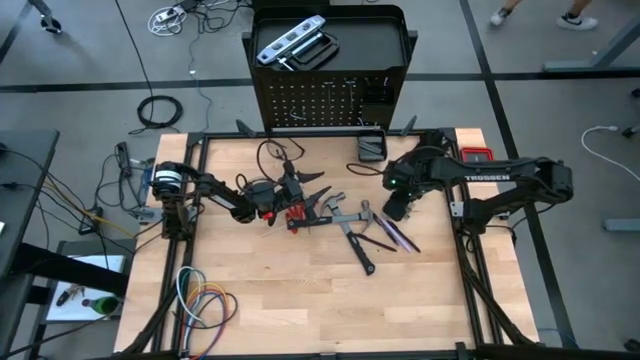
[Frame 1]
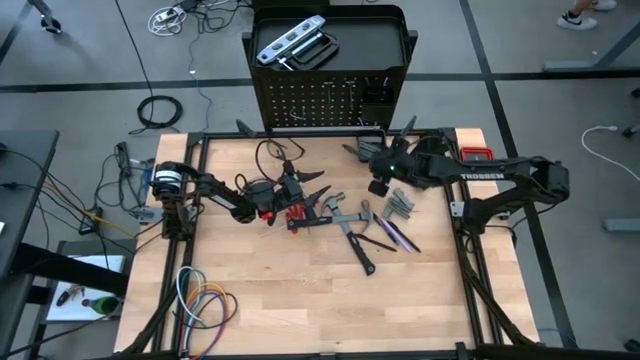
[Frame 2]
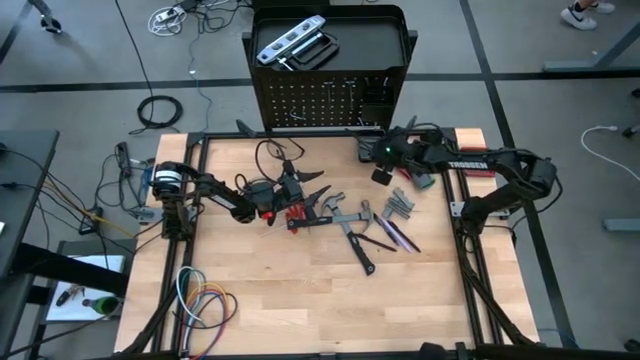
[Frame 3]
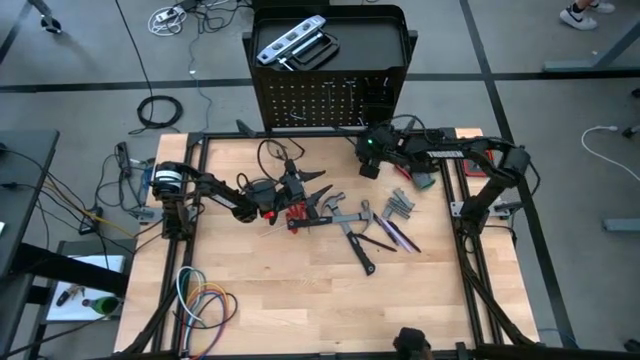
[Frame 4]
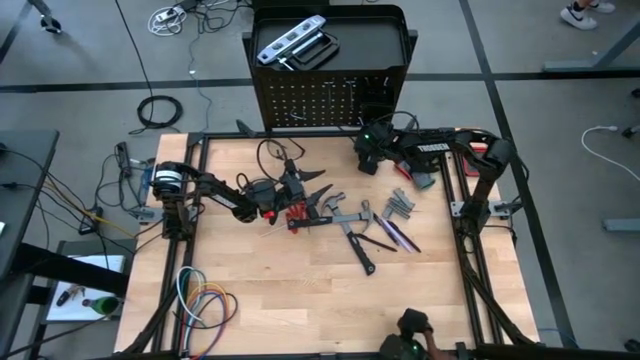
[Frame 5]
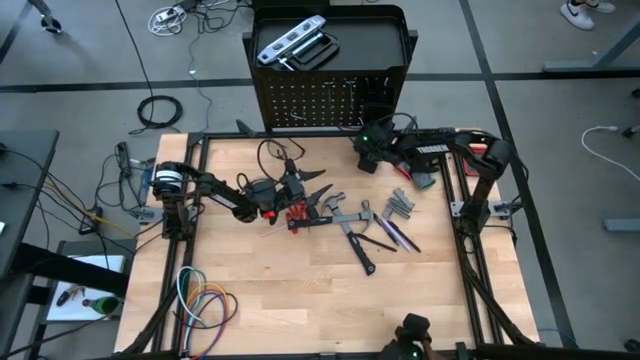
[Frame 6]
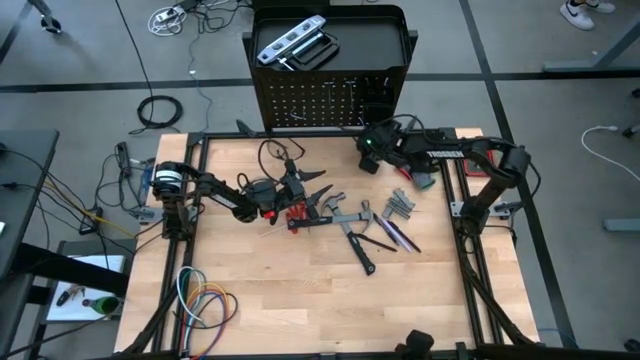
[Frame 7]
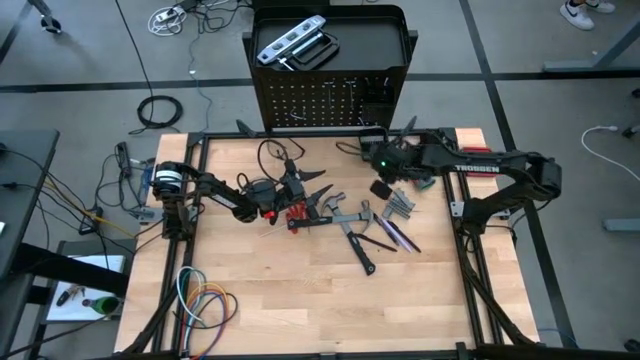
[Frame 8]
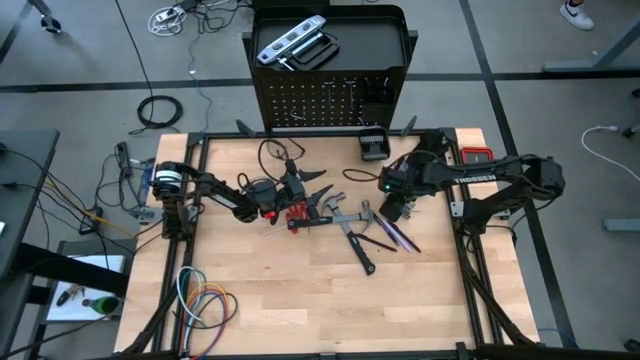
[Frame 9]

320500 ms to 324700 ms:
Task: Hang tools onto peg board
Remove the middle terminal block from the bottom basket of the peg board

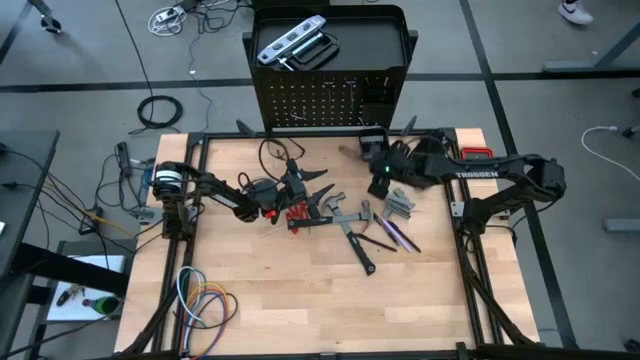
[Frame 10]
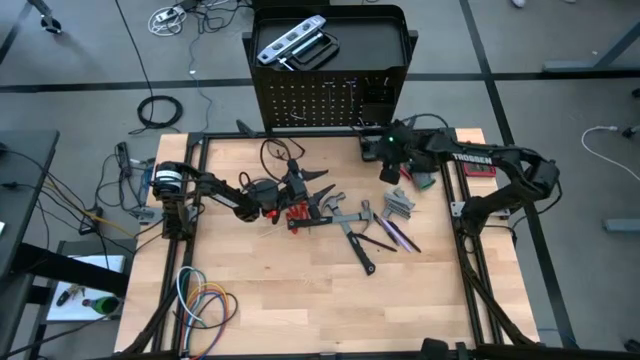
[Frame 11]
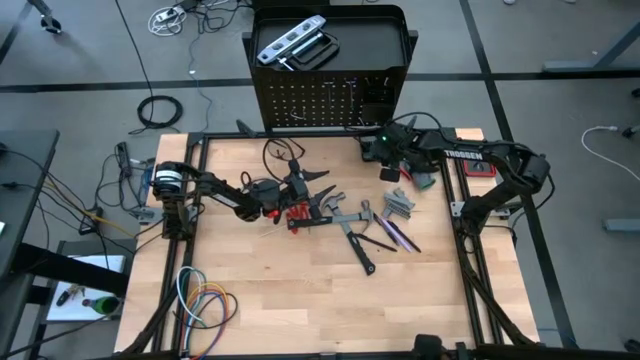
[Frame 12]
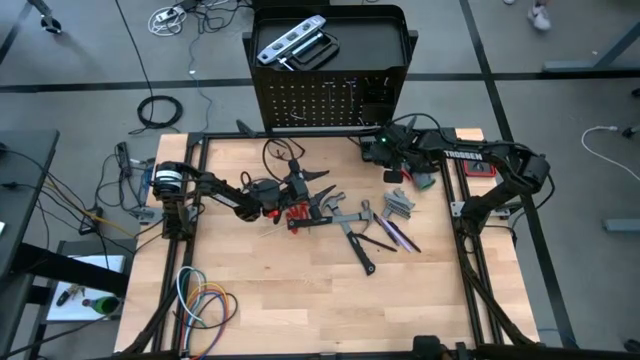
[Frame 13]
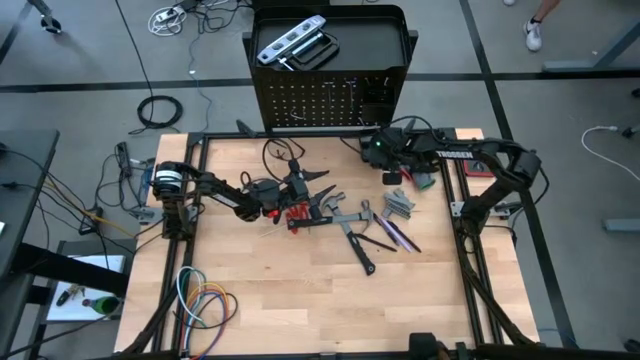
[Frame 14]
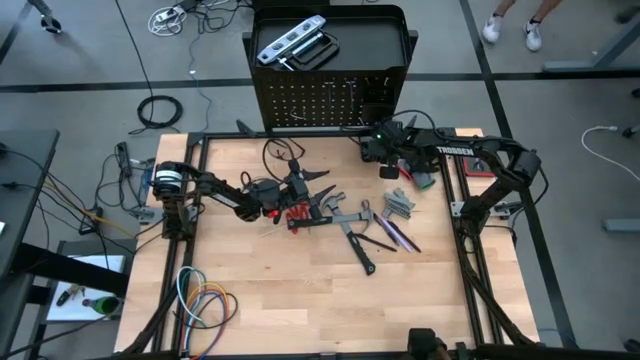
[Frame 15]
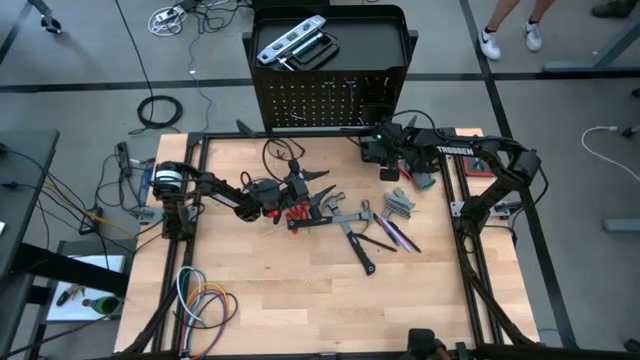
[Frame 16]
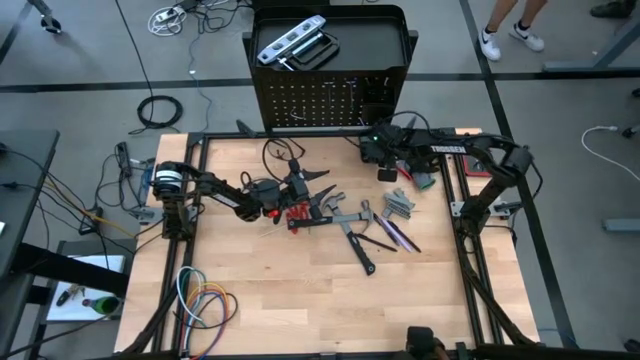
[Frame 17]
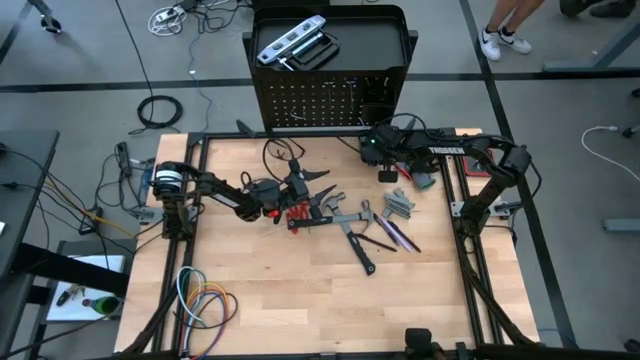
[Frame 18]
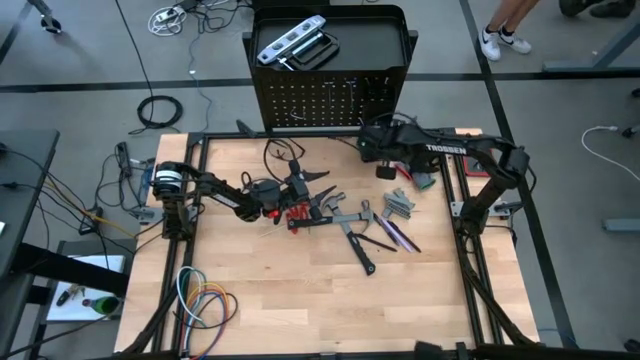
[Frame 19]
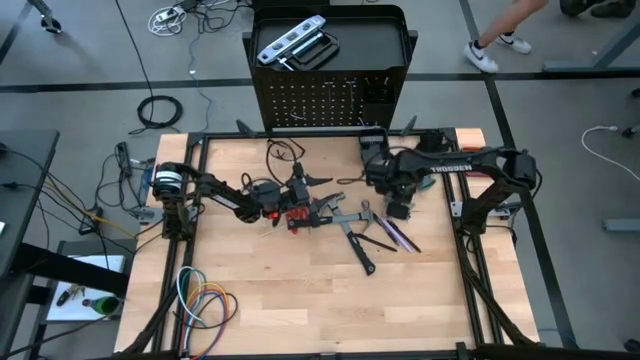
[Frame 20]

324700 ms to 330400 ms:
Remove the left terminal block from the bottom basket of the peg board

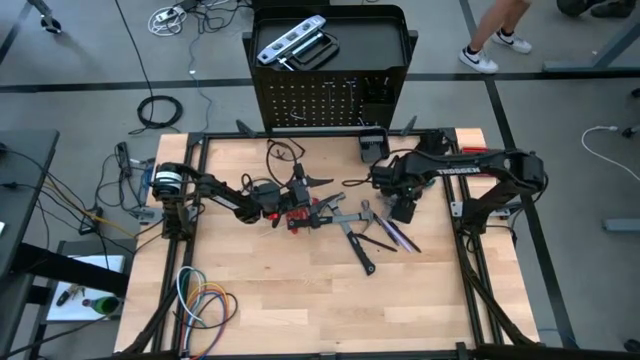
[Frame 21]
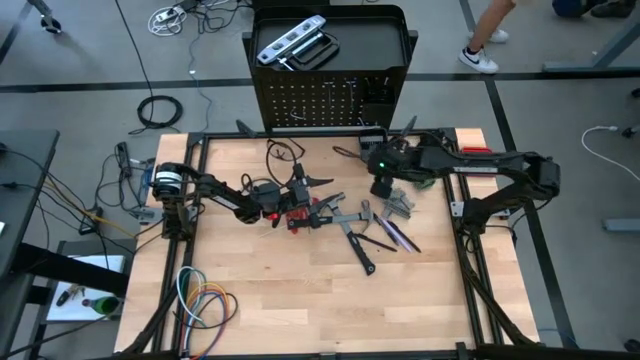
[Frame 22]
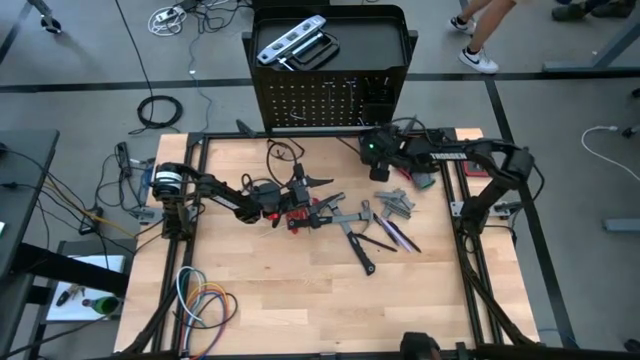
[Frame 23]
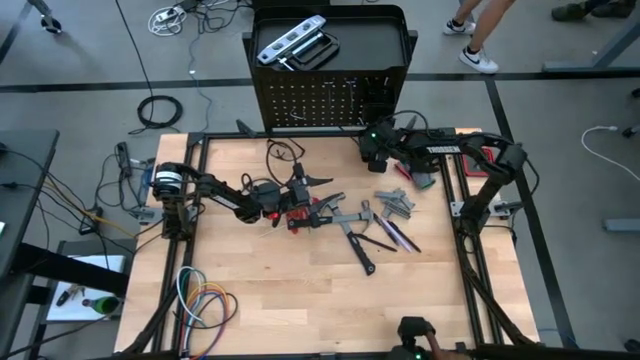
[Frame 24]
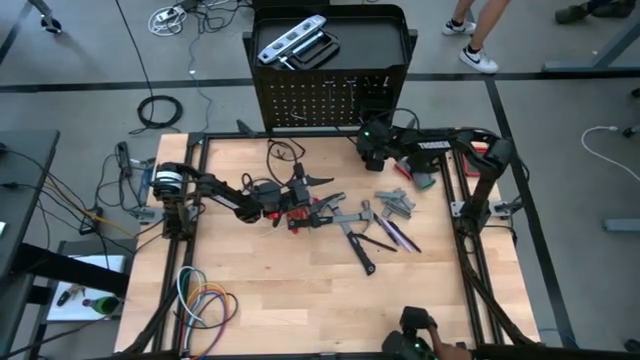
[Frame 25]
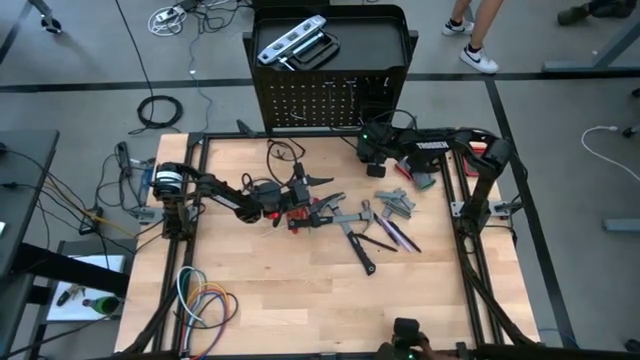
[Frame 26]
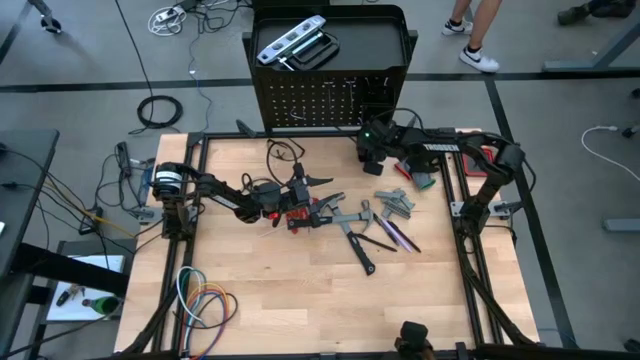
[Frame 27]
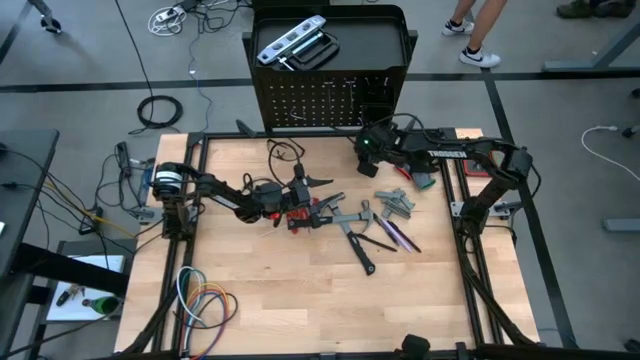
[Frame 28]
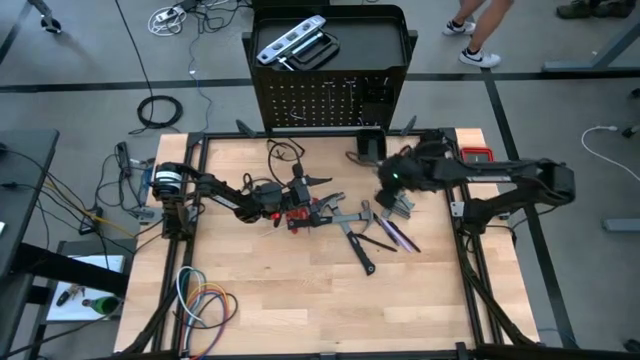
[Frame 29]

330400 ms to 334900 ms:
Remove the terminal block from the bottom basket of the peg board

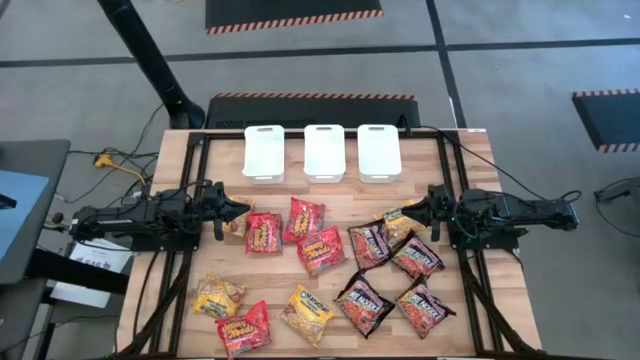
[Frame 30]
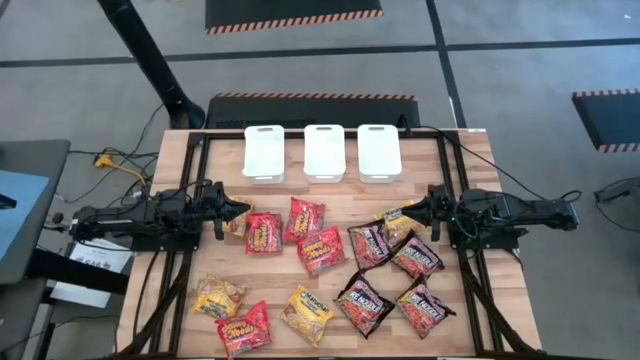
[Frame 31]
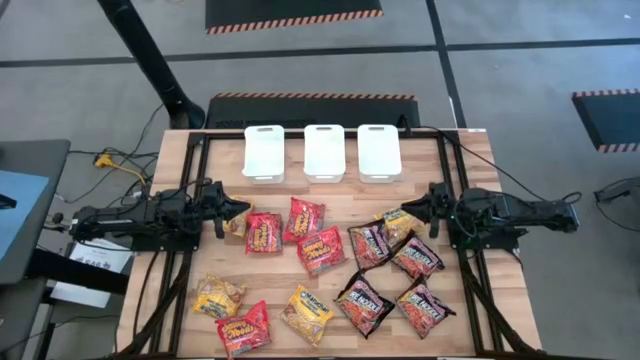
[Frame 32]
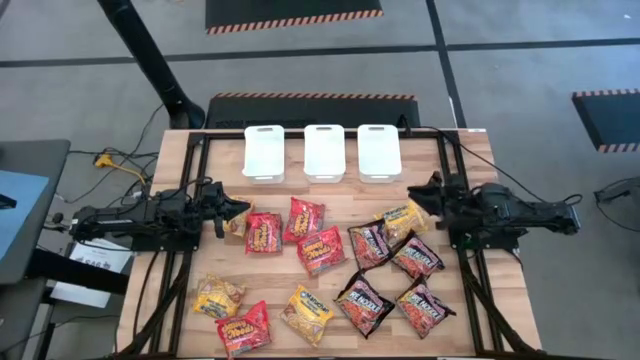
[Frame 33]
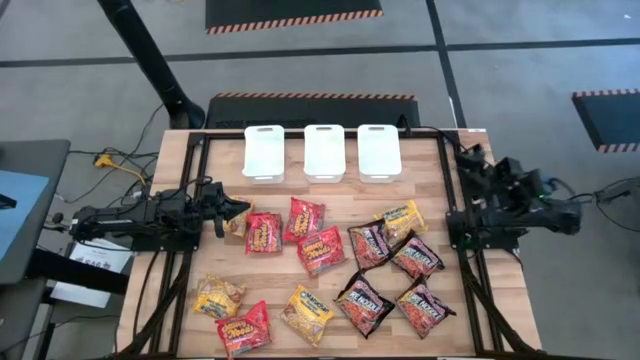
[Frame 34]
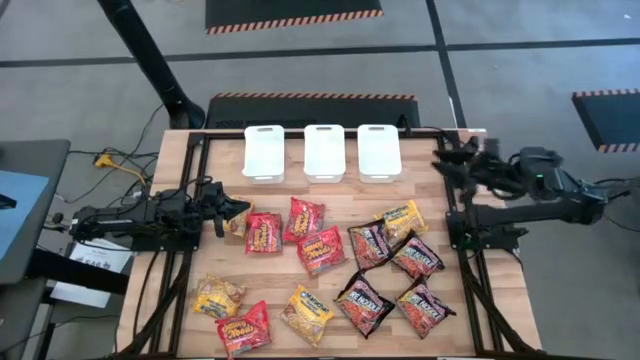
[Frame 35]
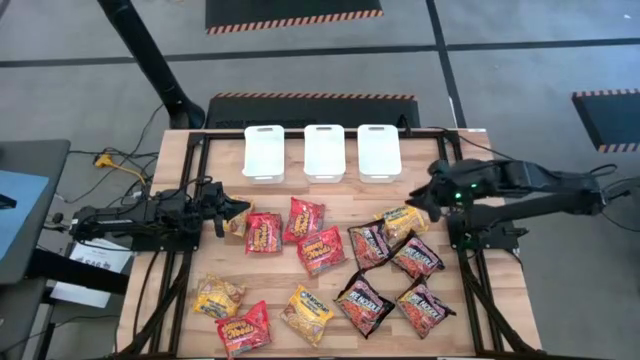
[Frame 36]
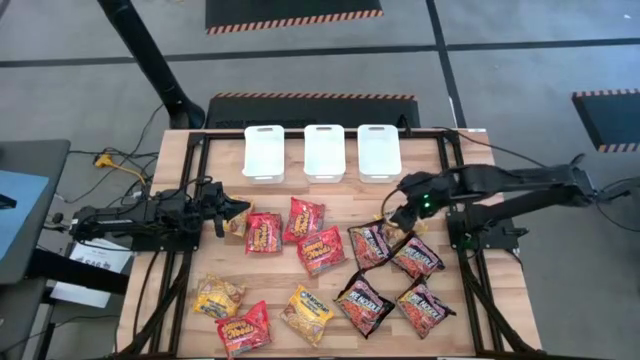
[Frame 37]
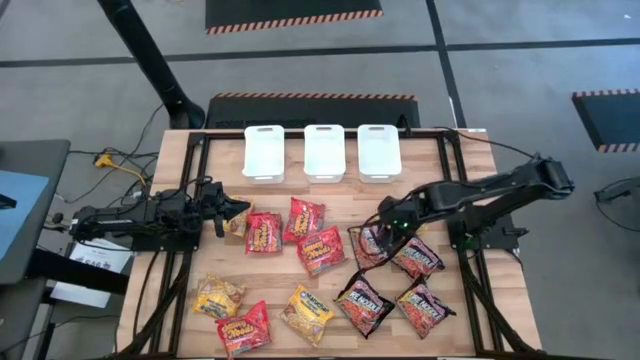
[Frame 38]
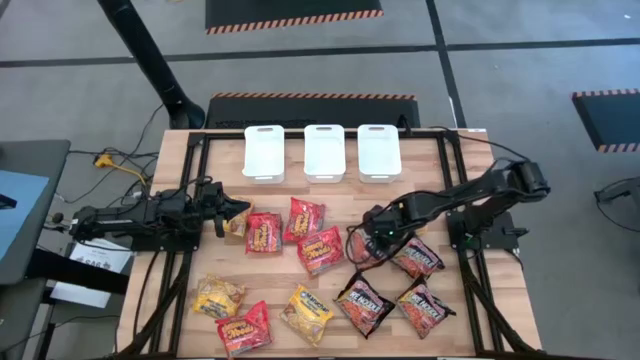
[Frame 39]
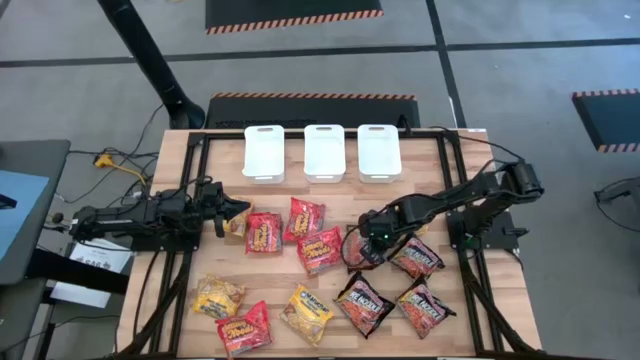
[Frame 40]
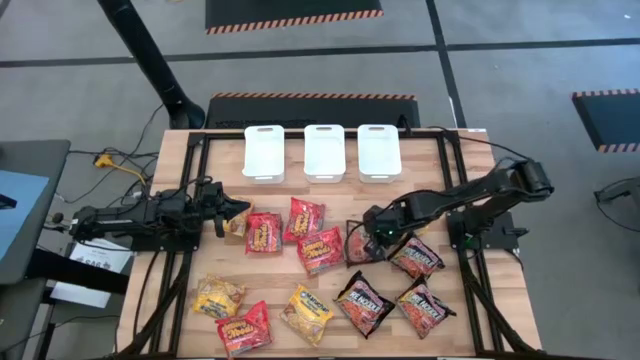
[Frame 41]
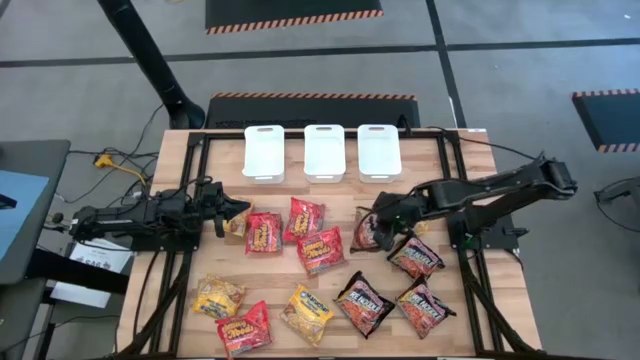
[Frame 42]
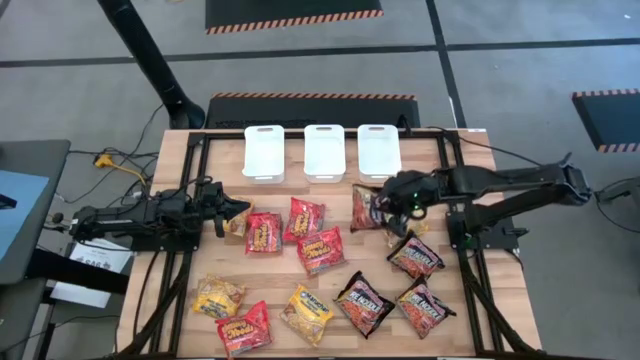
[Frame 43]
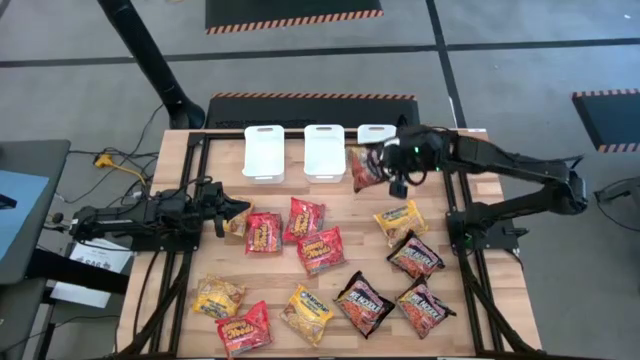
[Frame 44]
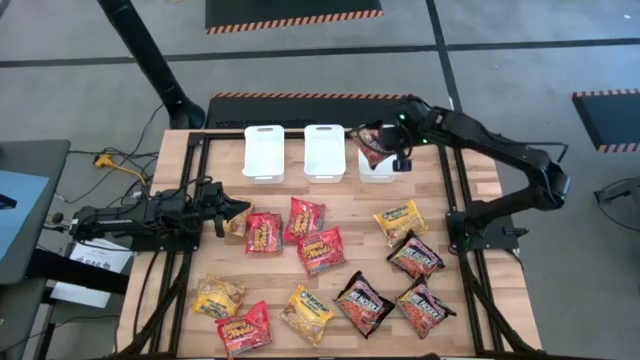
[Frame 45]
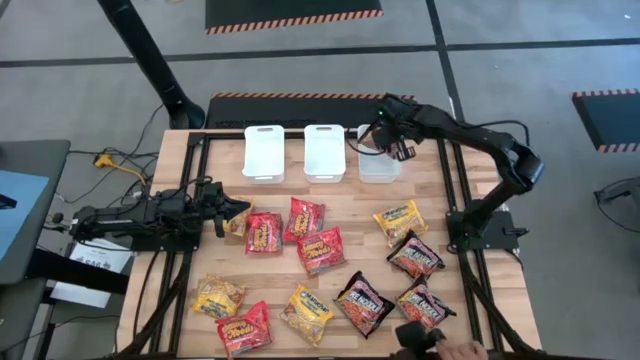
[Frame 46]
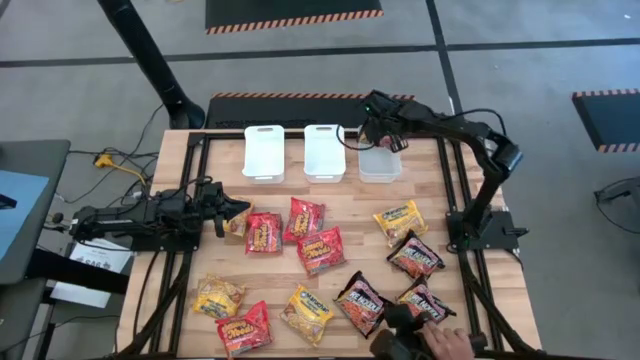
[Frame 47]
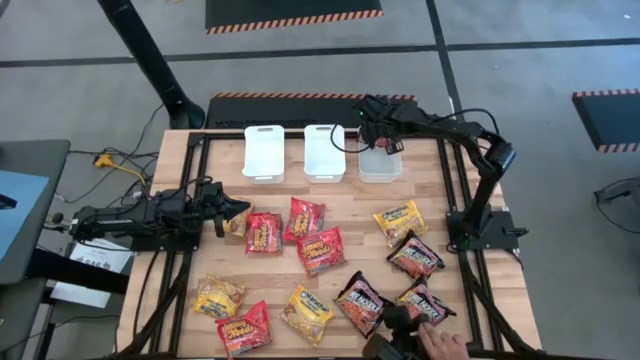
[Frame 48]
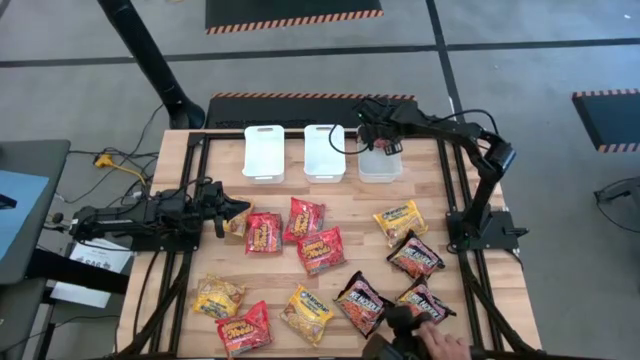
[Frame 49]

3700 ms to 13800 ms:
Task: Sort Maruchan noodles
Put the black noodle pack into the right white bin
